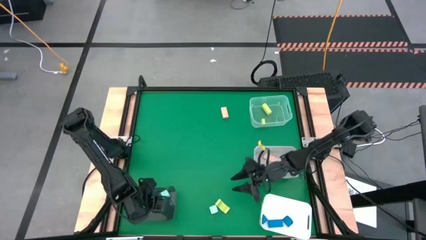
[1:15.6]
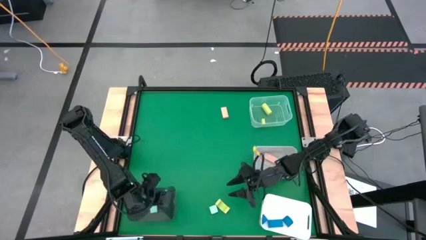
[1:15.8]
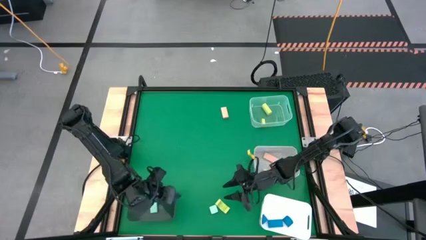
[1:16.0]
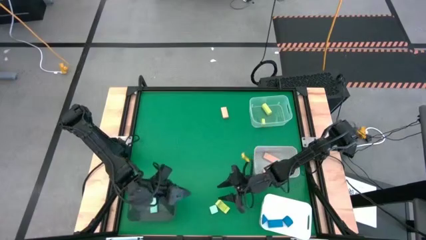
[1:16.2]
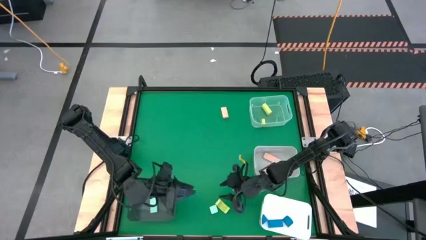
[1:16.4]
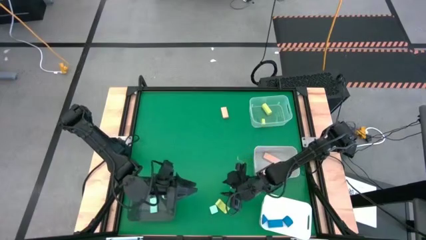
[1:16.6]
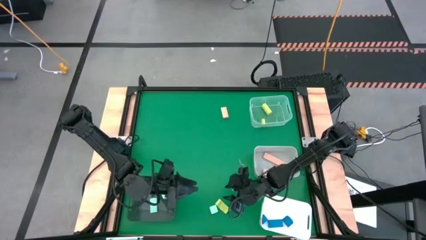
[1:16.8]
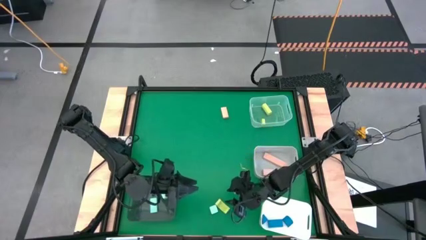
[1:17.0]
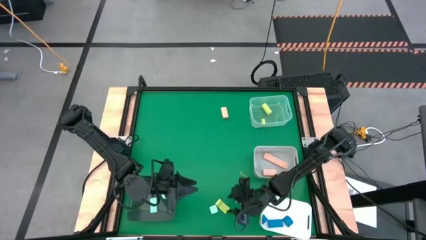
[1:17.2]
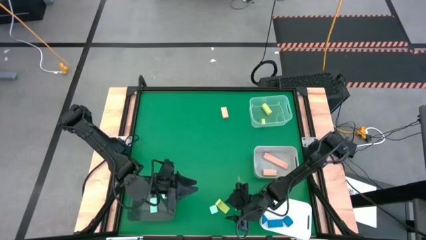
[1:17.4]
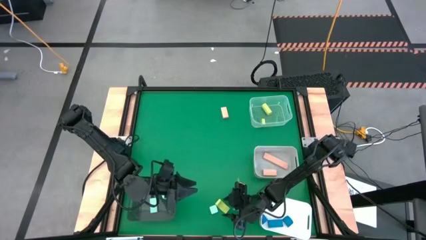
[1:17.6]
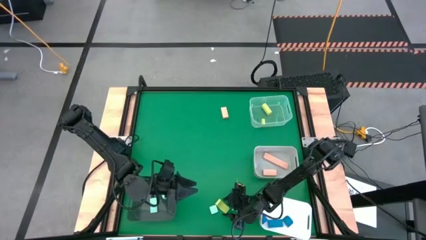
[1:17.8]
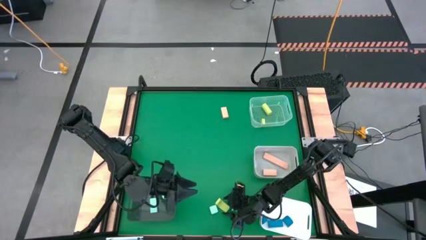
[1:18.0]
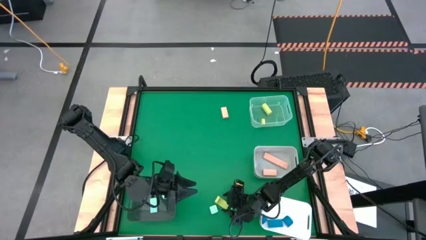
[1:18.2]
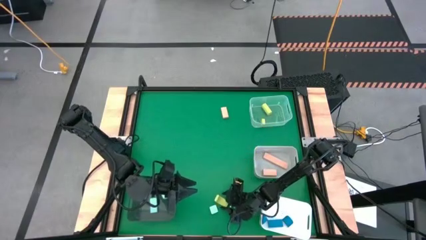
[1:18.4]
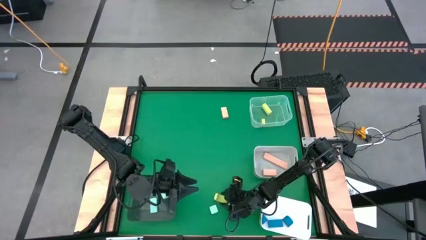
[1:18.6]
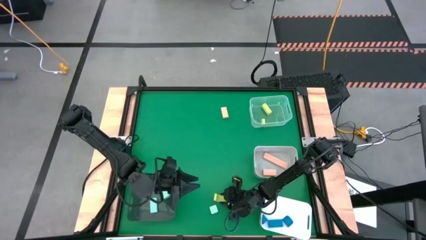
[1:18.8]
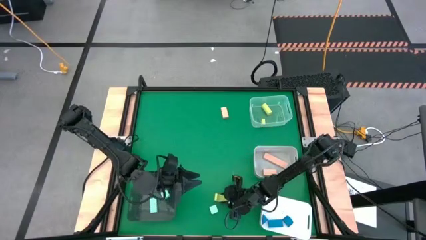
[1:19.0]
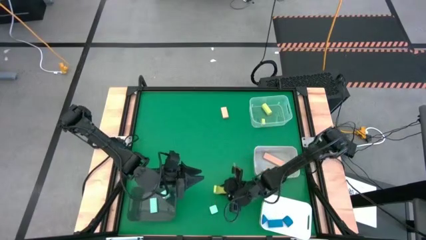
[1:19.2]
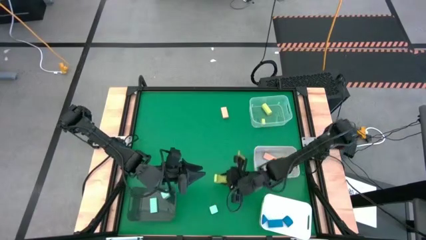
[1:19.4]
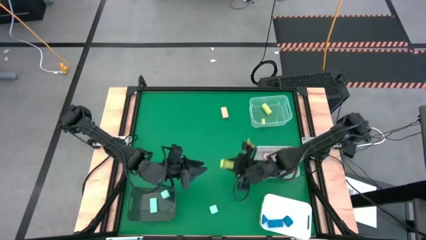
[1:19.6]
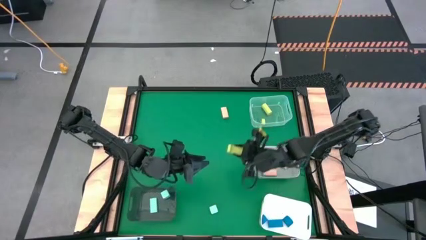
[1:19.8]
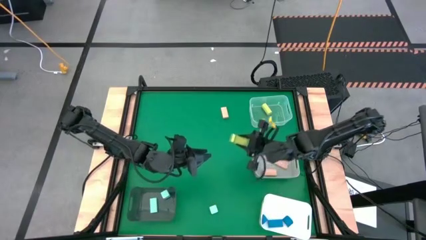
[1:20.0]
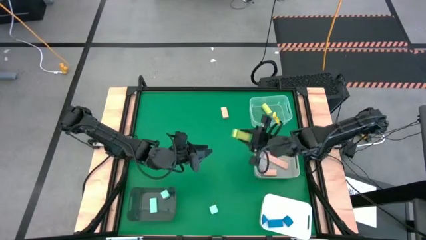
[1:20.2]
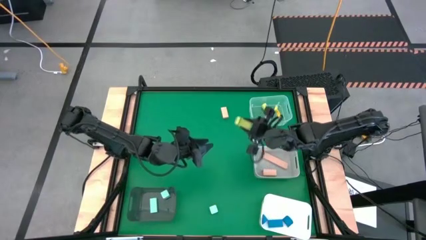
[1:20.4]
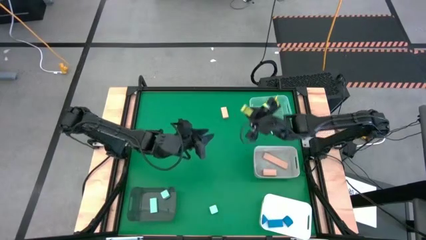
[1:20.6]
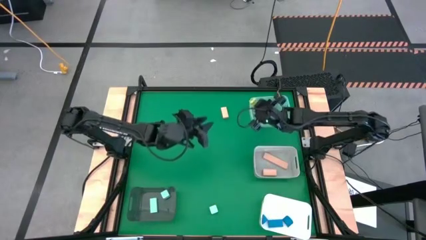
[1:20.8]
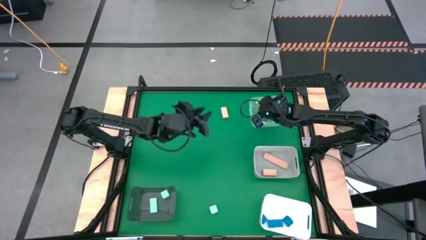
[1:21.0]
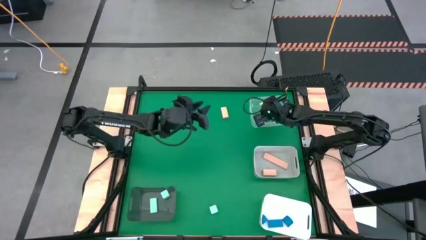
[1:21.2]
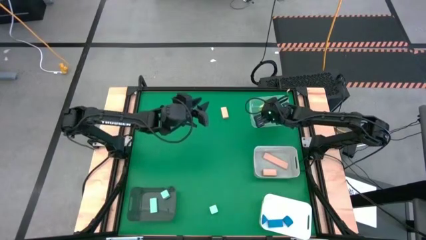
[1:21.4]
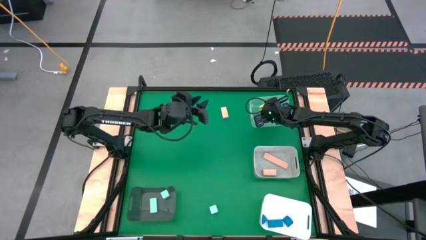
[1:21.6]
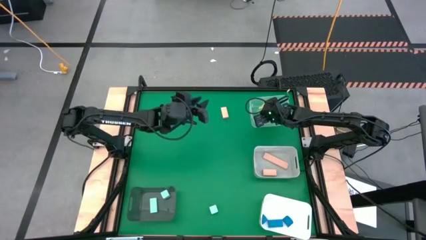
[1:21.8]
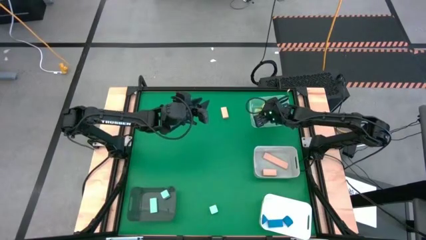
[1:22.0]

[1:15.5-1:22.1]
Task: Sort & place blocks by color
Put the green block into the transparent bin

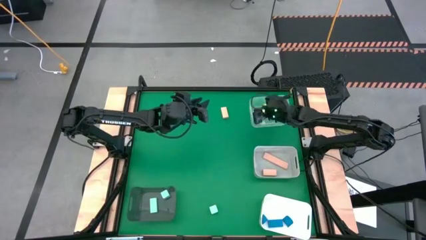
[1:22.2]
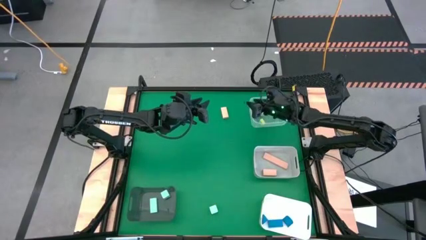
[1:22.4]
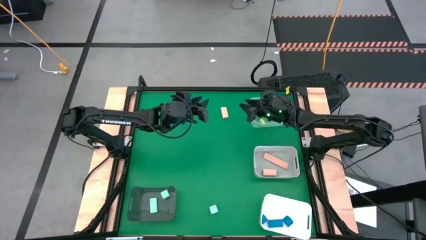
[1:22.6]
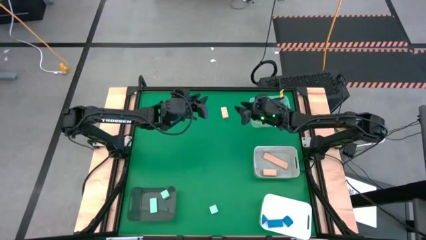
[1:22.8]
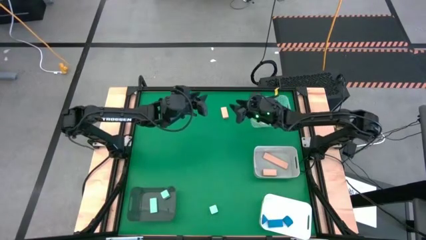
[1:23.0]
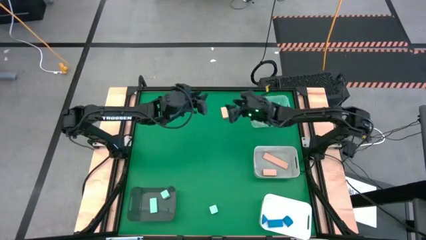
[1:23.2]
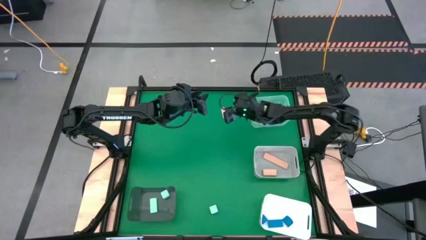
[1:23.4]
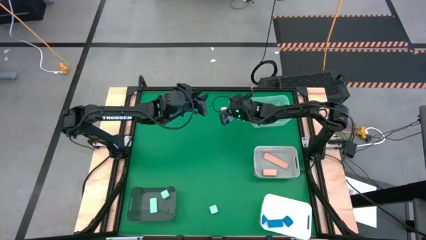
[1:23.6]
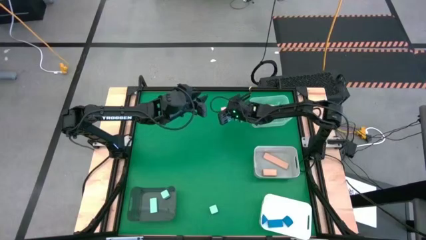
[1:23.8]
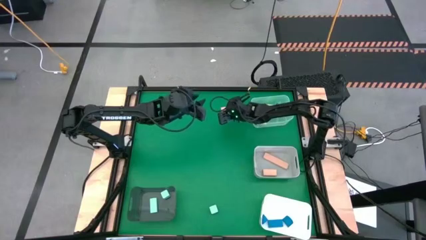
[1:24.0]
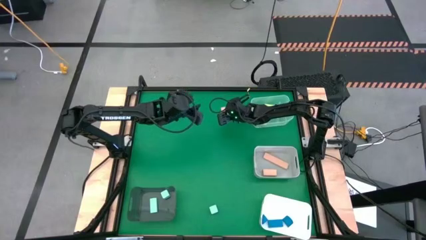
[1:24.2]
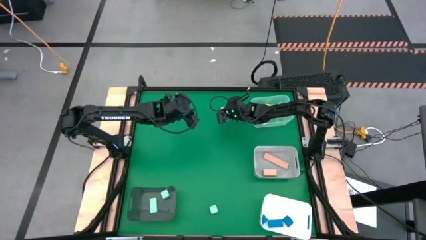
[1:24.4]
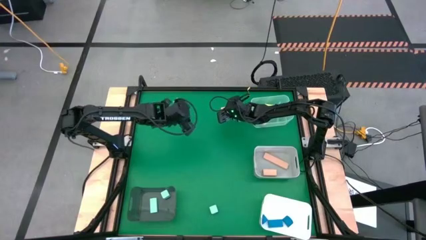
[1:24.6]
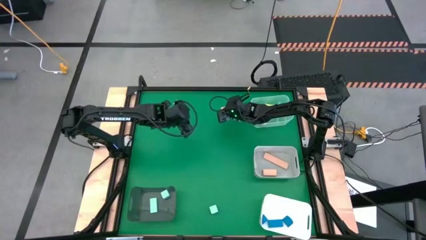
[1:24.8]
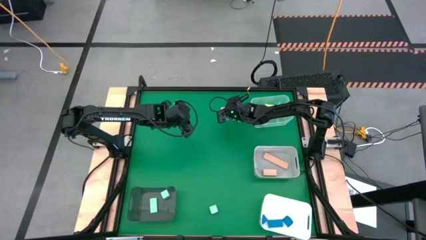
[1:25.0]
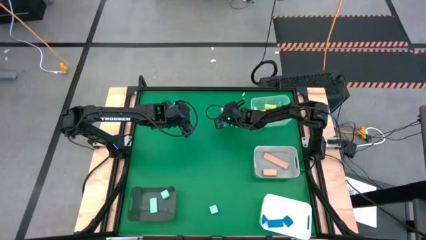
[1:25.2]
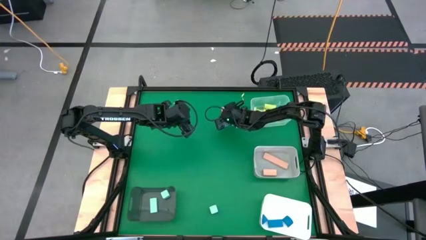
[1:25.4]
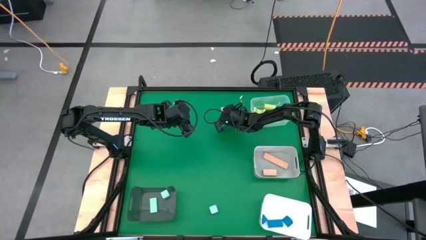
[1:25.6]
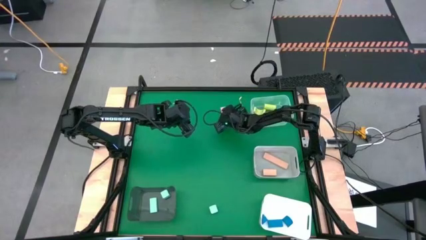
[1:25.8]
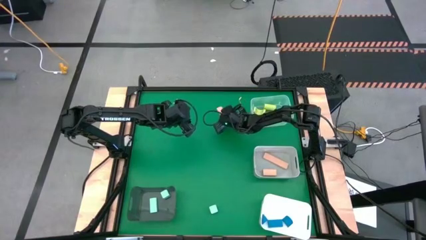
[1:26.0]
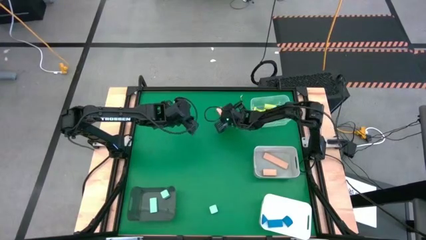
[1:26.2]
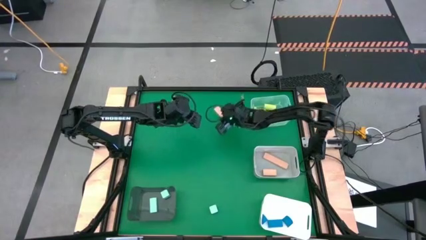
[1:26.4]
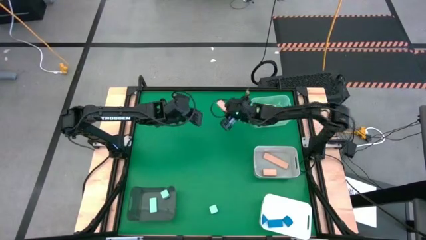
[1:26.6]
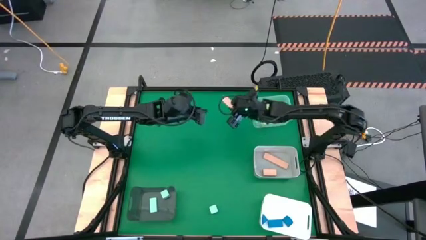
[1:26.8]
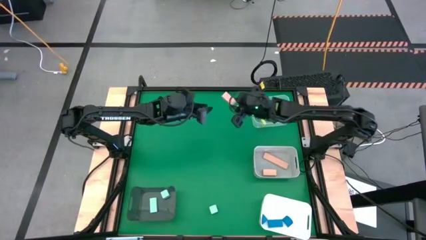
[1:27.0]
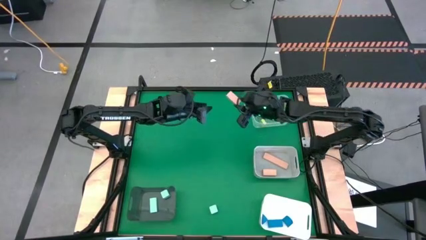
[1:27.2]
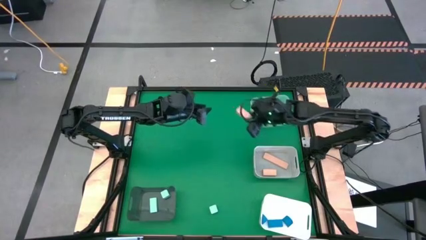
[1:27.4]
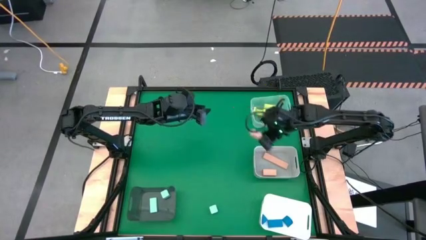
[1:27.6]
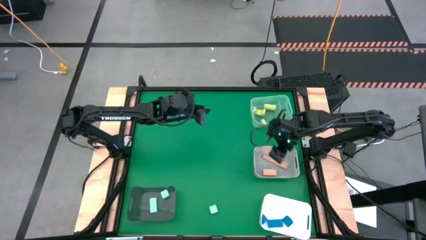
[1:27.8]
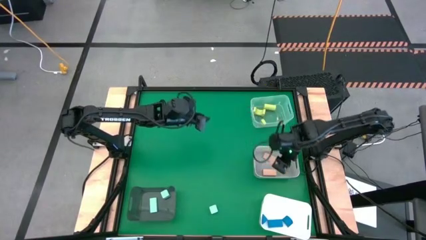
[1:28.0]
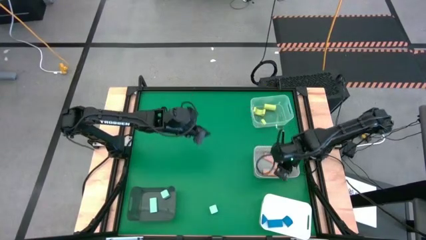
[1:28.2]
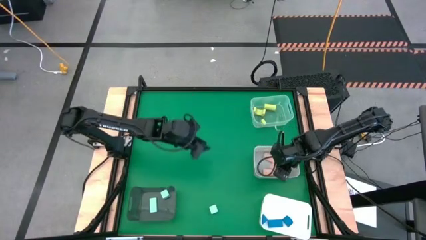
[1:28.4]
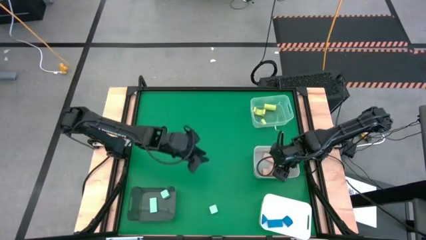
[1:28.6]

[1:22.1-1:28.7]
Put the pink block into the gray bin

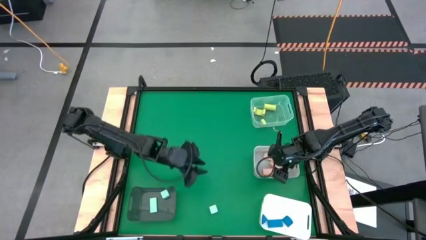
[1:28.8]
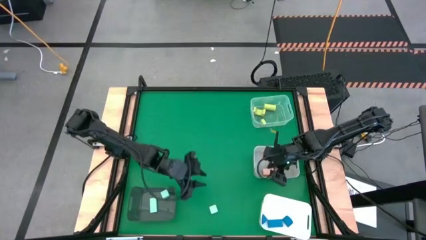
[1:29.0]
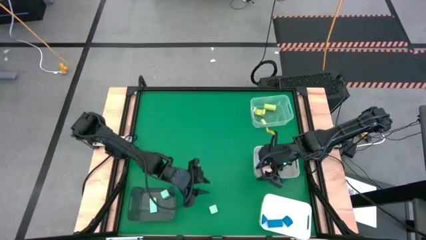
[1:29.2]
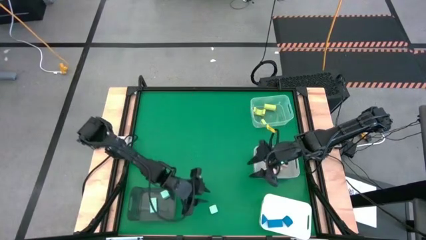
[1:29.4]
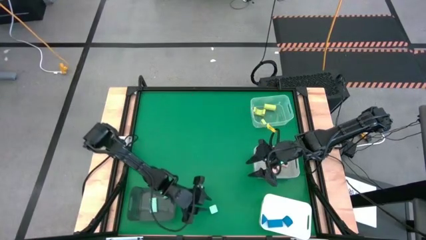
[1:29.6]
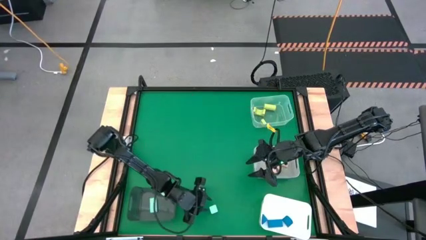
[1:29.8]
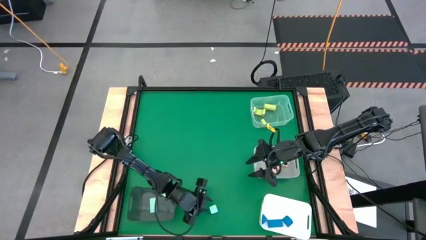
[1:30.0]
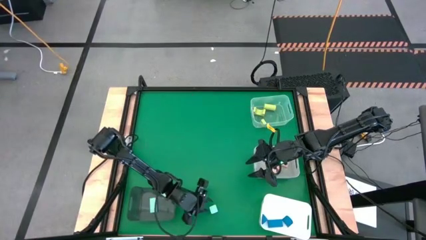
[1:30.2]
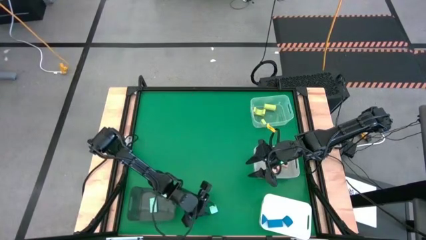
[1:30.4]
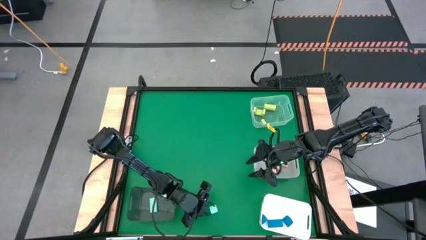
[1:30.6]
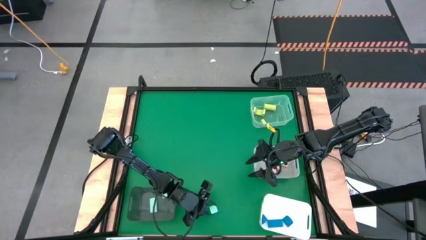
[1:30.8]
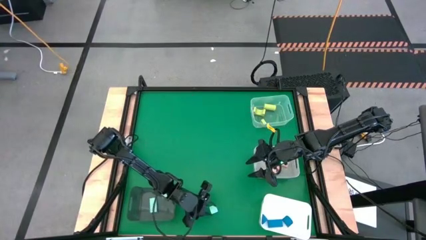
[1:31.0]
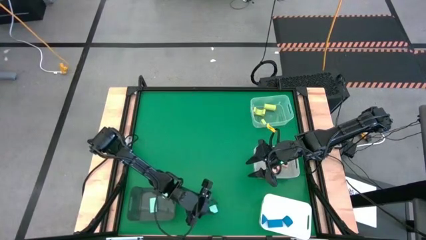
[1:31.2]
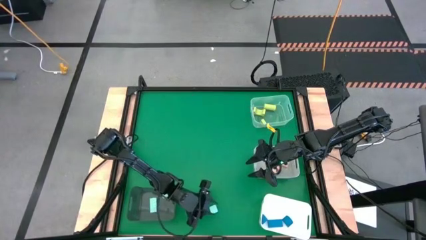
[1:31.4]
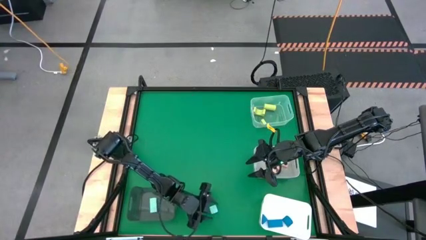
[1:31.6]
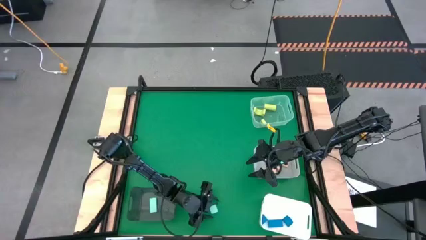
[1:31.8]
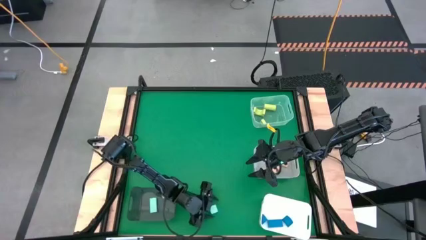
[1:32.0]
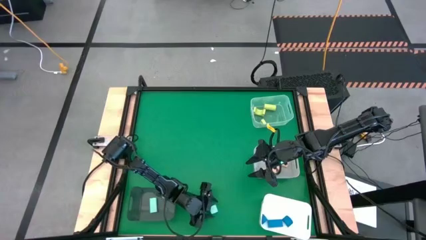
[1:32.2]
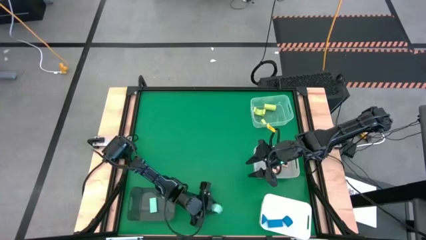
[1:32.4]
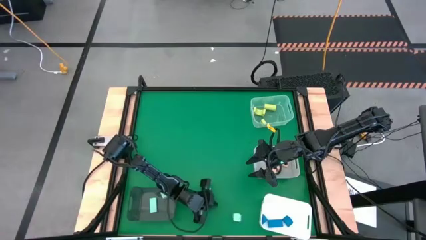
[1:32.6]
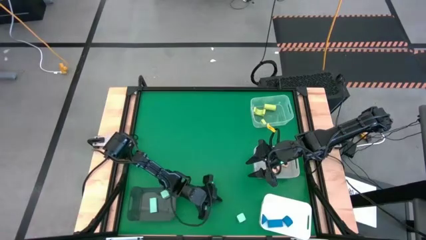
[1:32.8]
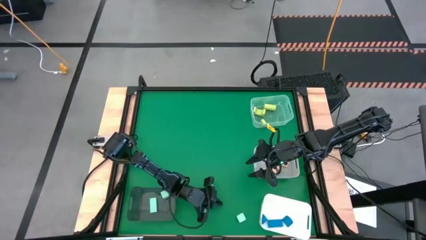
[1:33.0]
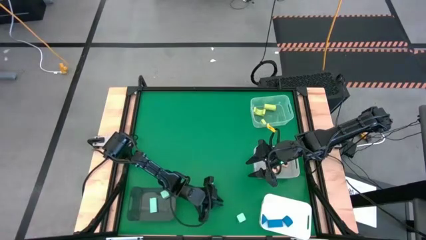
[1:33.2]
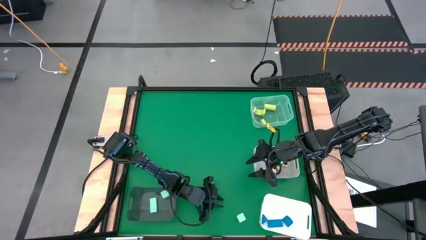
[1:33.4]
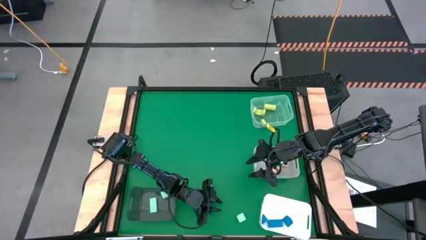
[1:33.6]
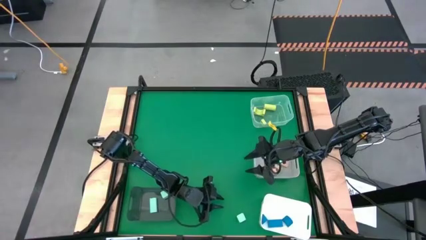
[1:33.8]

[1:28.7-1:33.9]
Put the light blue block into the black bin
